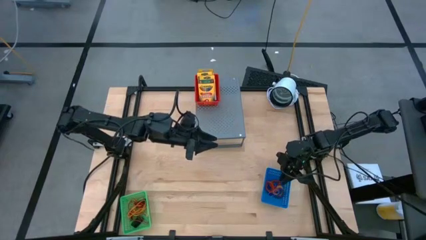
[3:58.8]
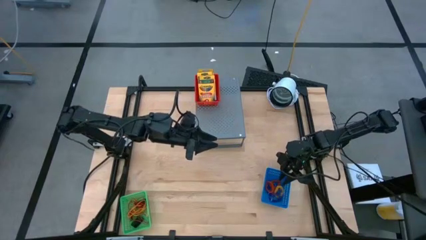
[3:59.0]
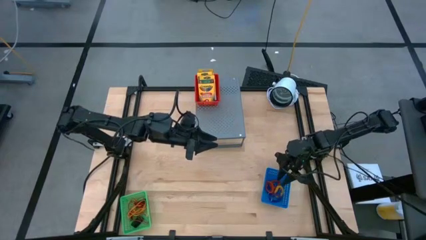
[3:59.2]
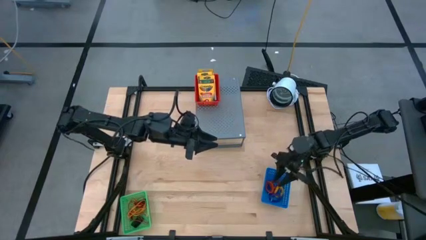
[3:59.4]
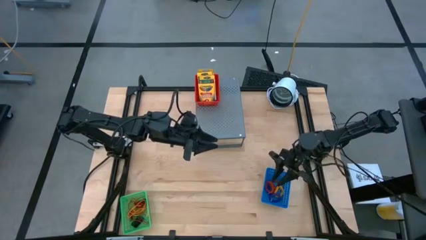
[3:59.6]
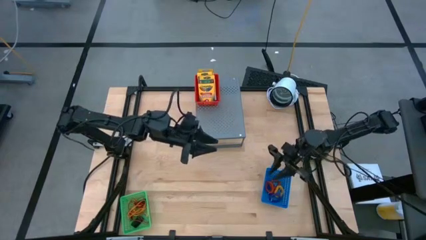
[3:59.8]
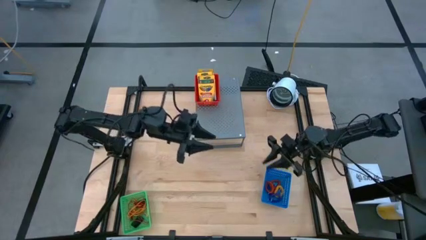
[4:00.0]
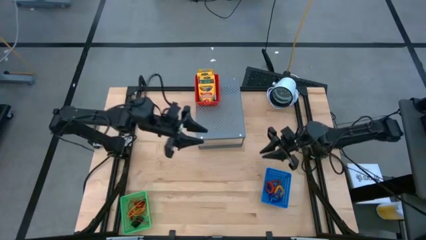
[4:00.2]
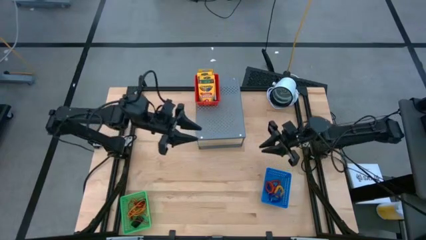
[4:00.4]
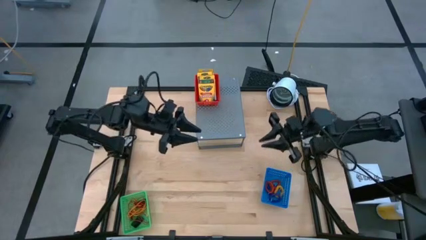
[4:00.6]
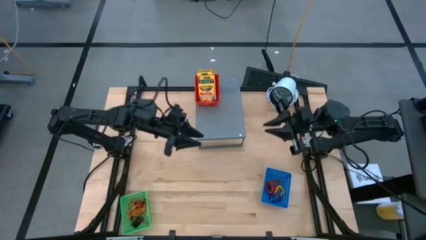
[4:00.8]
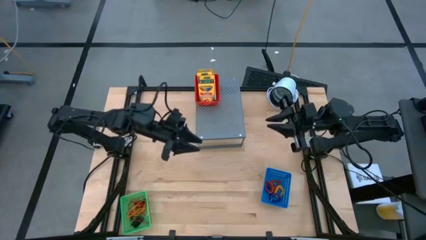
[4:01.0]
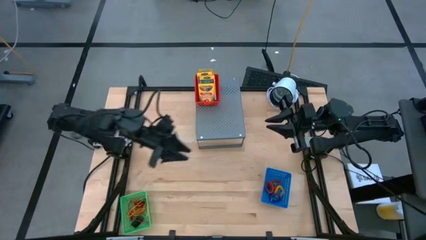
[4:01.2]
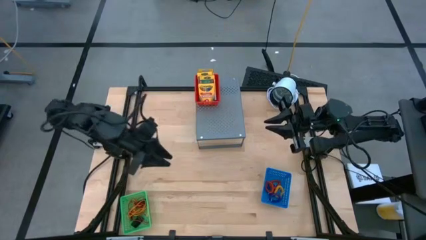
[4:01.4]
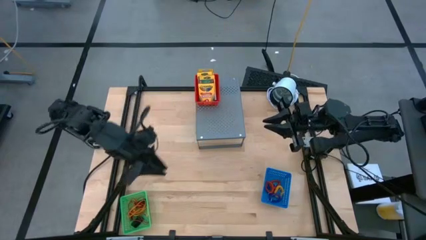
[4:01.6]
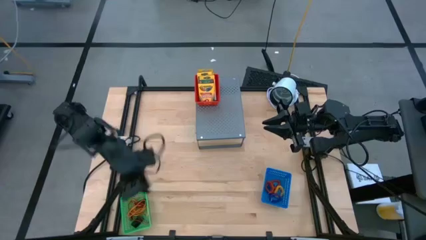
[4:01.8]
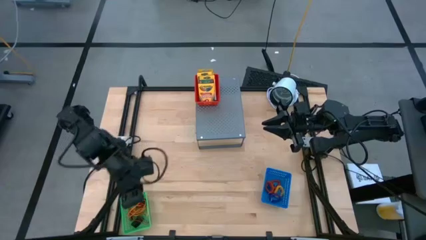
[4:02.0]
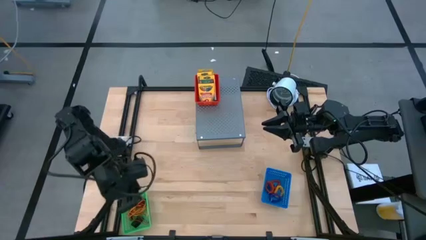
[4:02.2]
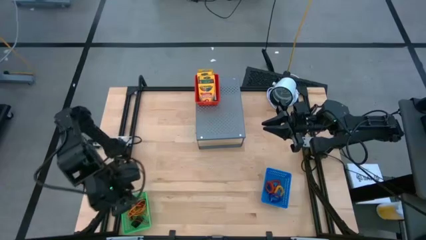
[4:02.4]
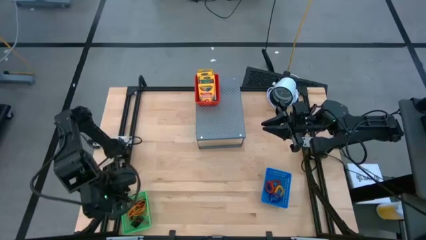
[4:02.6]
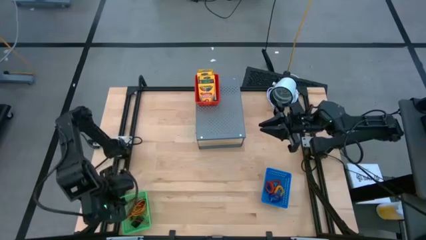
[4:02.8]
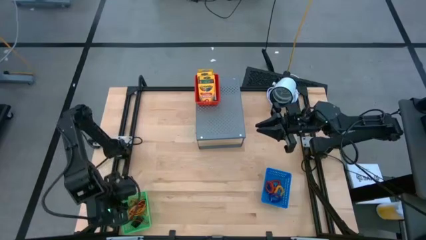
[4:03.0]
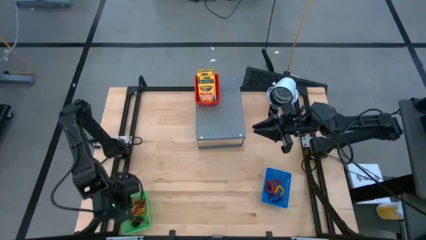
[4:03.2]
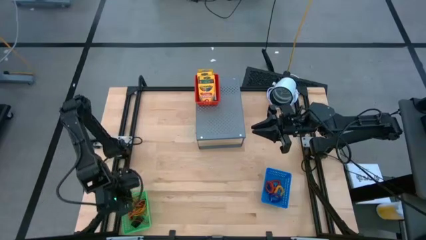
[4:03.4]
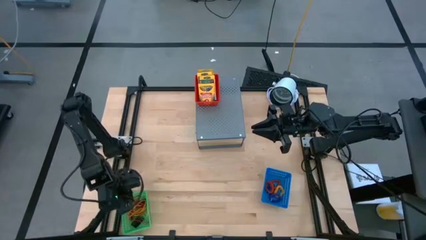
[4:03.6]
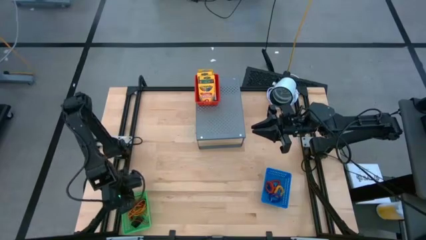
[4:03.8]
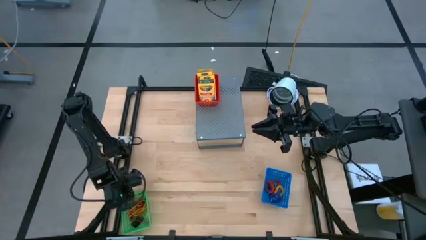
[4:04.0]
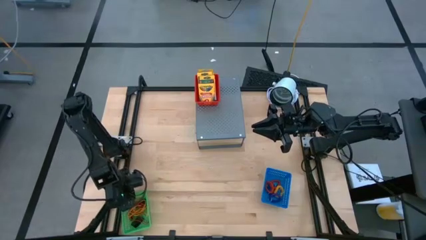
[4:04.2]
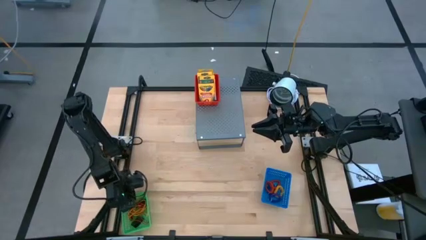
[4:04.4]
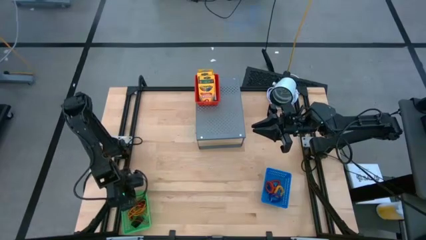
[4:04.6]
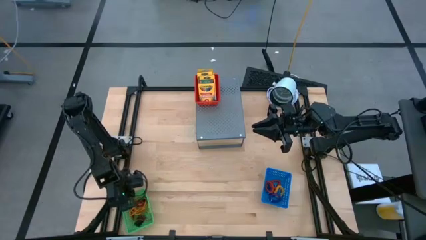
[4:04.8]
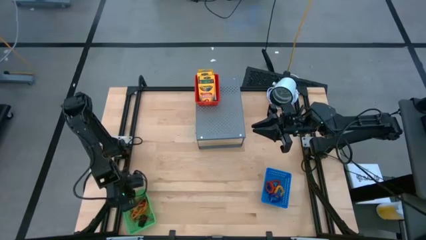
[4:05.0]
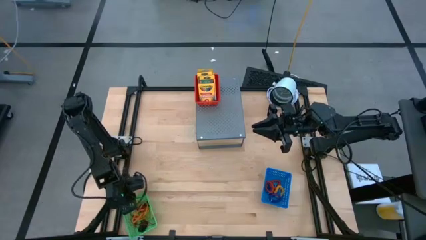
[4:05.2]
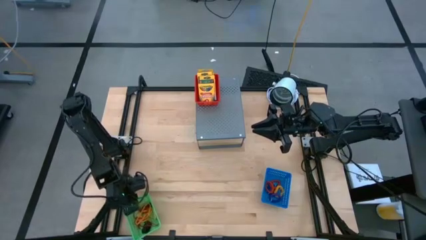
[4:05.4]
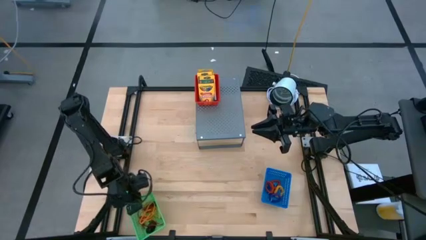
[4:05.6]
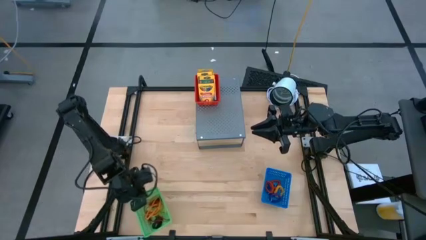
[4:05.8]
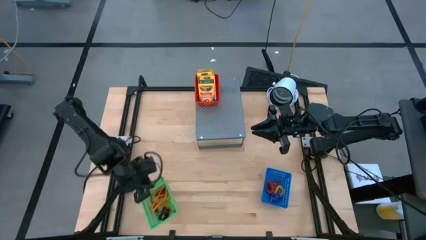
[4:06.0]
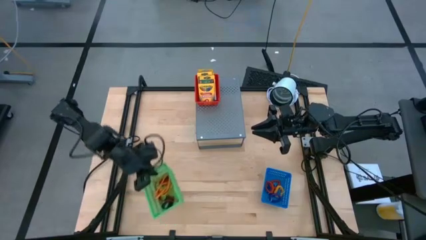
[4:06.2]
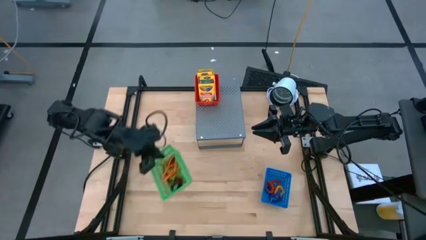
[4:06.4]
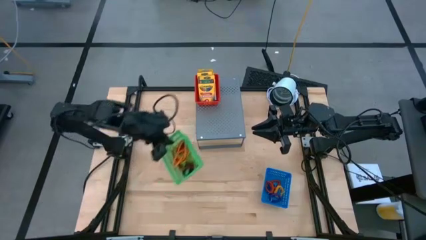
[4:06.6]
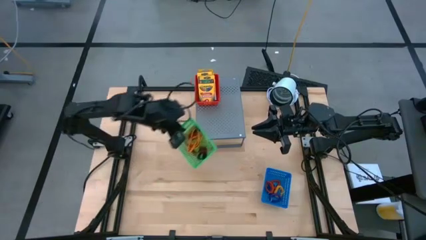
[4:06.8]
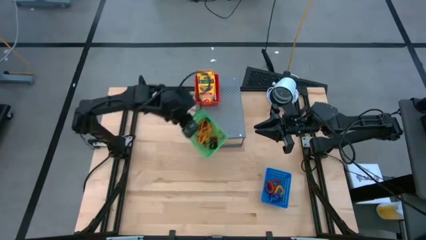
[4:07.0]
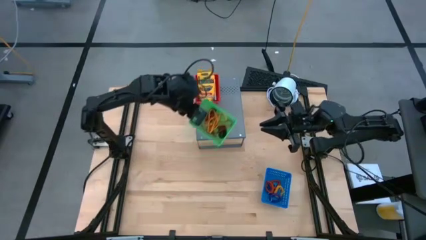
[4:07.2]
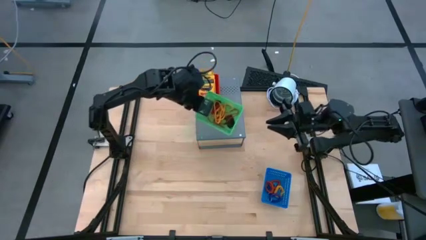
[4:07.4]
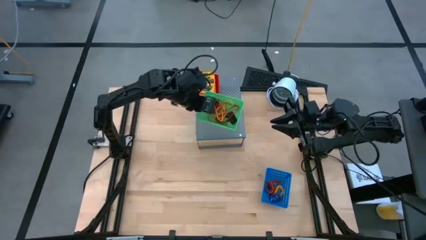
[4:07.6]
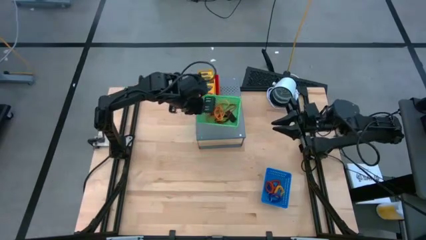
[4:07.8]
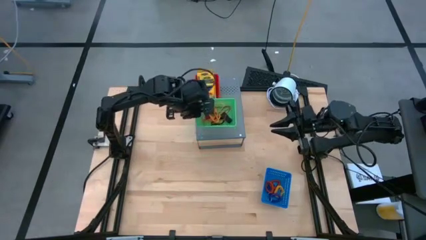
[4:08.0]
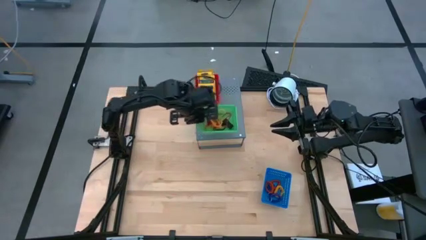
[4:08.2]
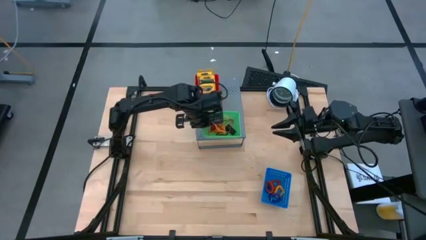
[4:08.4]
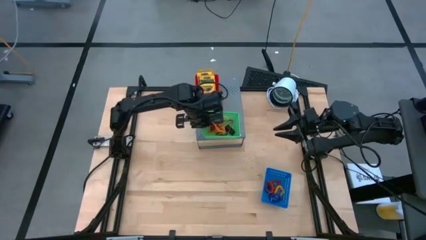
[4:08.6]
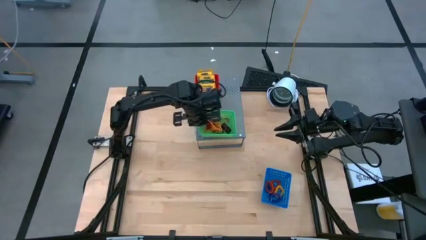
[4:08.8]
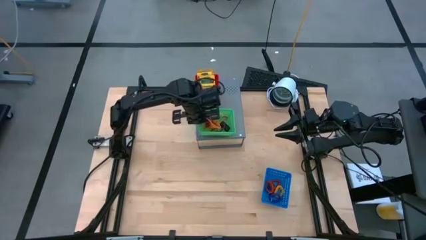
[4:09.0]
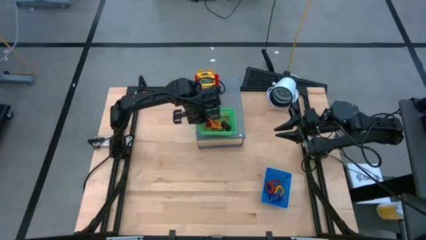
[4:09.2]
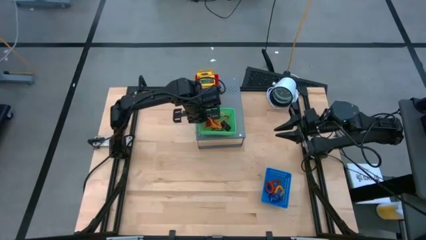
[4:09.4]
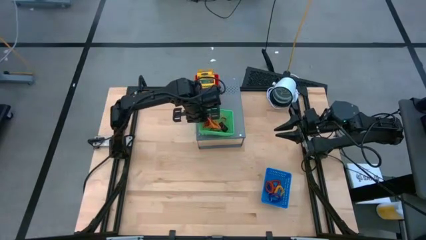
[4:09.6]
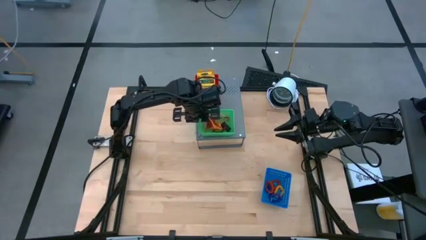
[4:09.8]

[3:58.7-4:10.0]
Task: Pick & Place Office Desk Supplies
Put the green bin on the shelf

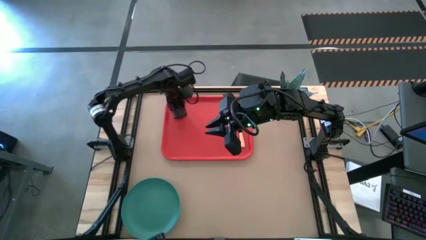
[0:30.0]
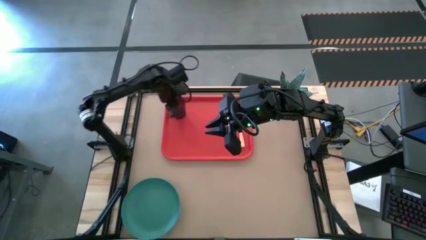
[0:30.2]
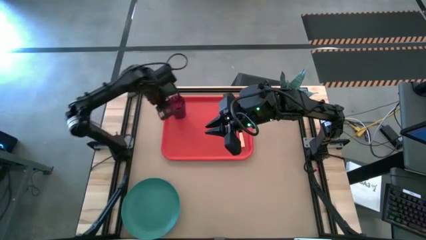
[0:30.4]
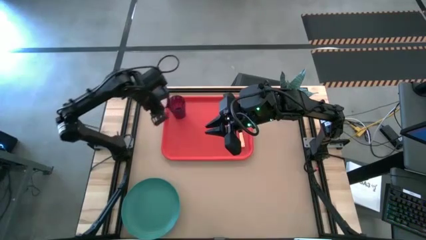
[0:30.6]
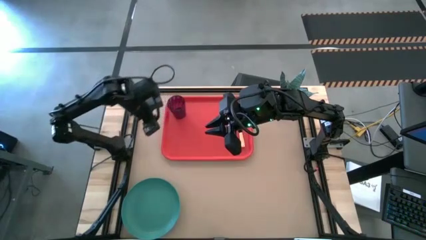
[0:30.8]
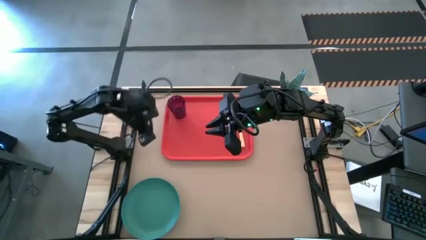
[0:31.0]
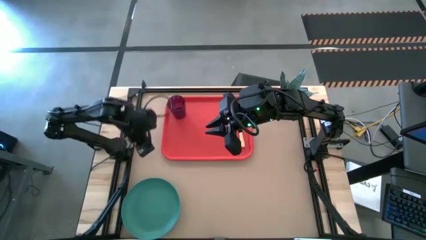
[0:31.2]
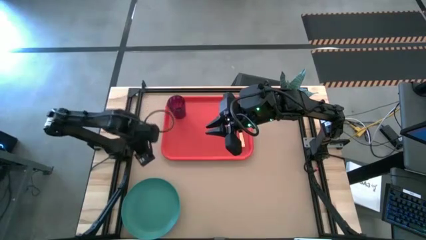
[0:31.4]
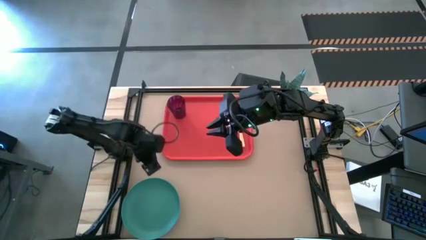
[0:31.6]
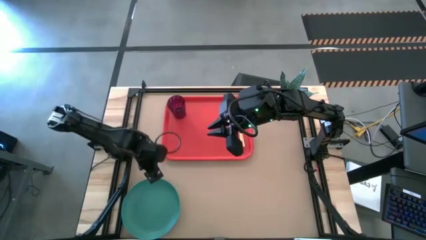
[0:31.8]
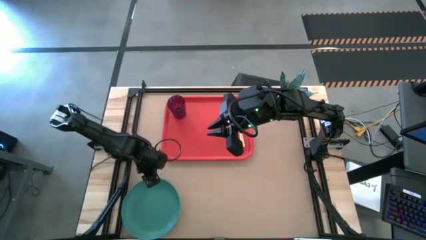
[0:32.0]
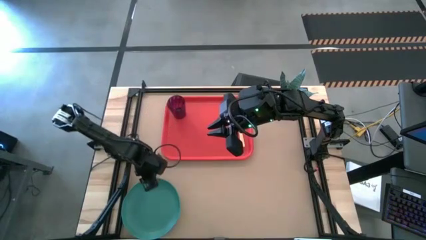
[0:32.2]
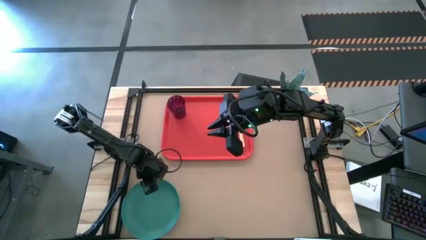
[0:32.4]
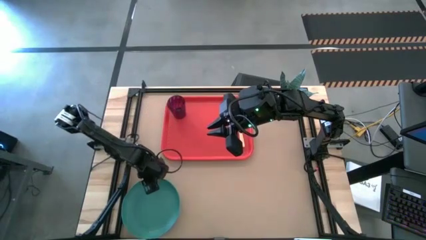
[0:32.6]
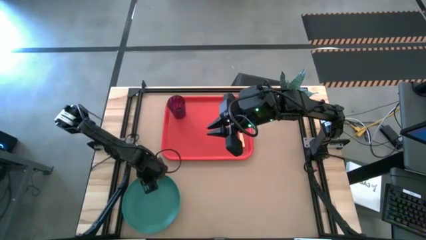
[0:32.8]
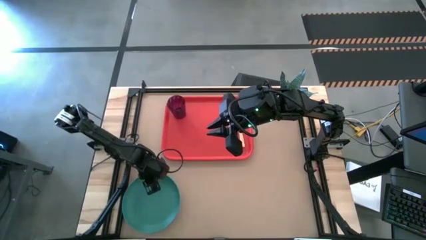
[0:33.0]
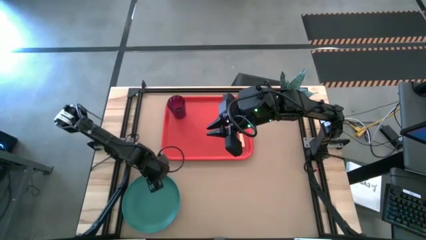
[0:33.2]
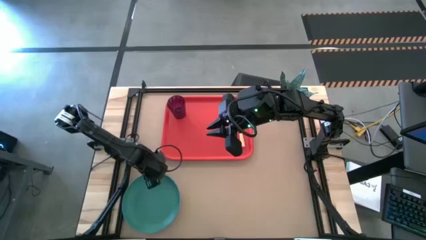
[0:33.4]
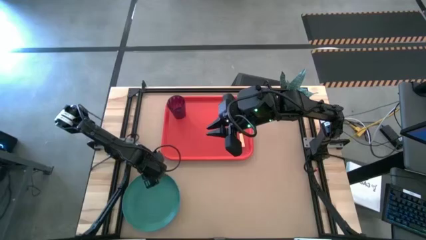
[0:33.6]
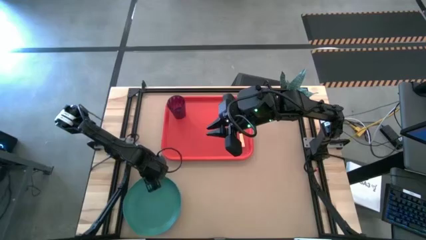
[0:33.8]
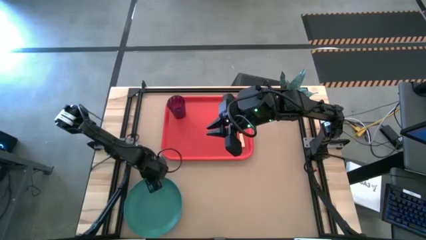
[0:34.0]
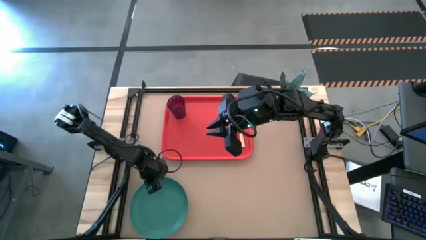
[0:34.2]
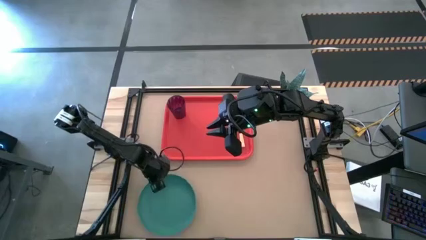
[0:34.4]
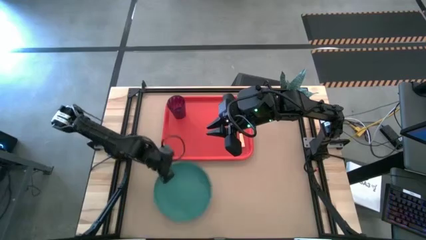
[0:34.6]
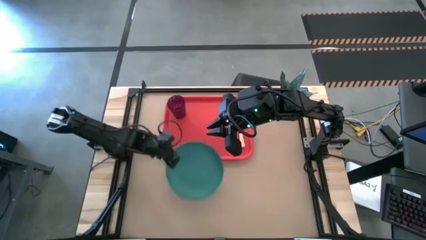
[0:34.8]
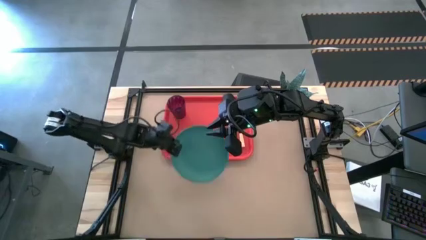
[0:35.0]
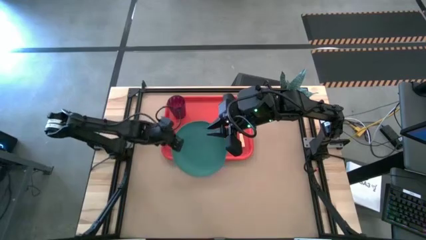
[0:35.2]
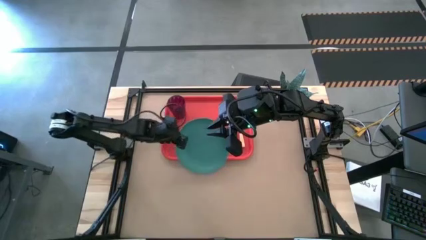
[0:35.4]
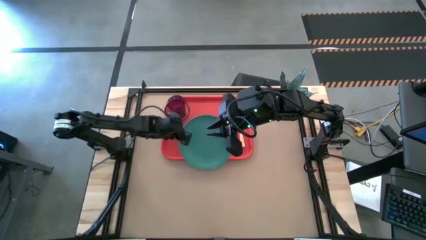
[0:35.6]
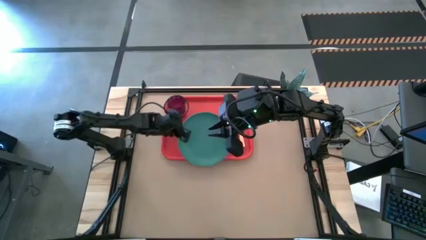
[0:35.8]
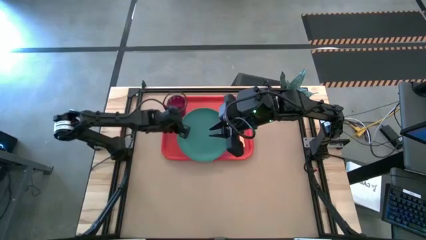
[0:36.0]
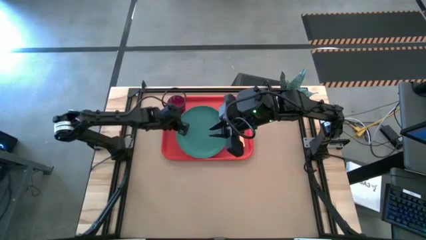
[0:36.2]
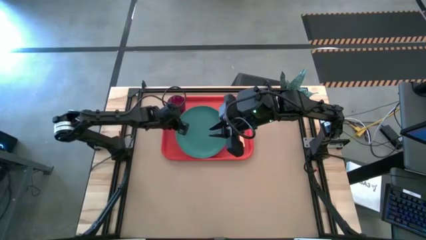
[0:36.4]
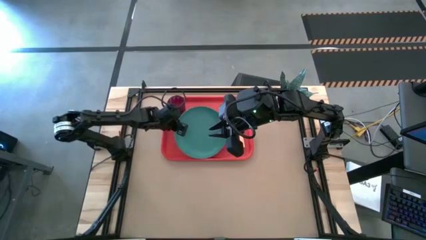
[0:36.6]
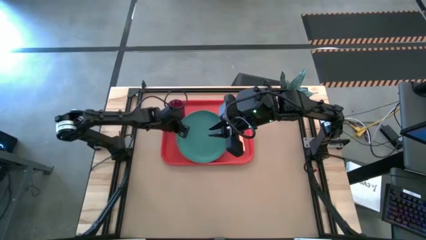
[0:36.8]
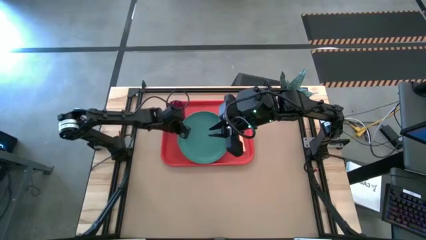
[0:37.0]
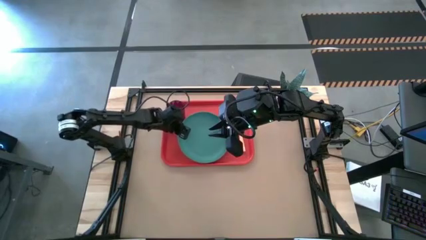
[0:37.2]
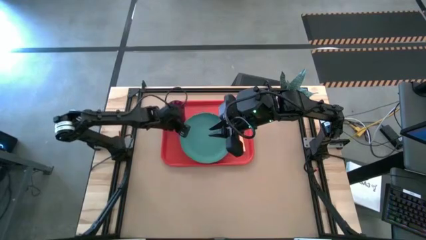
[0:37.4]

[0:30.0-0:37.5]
Task: Pick and place plate/cup/fork/spoon on tray
Put the green plate on the red tray to the bottom right of the violet glass
